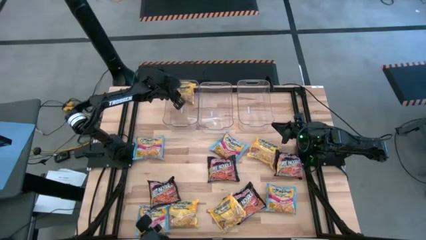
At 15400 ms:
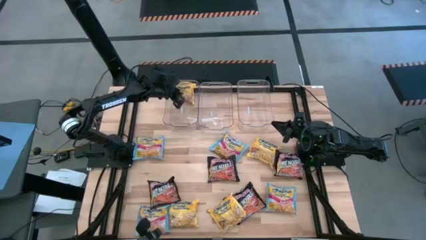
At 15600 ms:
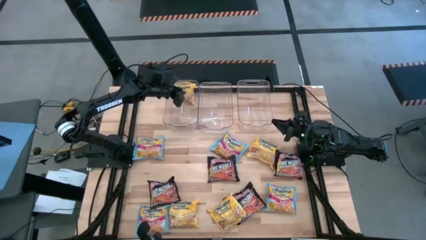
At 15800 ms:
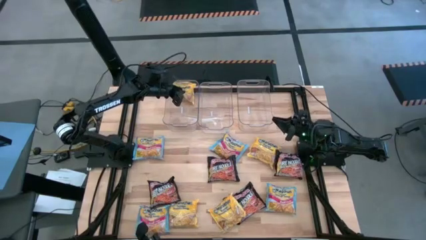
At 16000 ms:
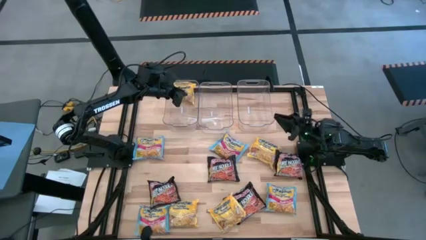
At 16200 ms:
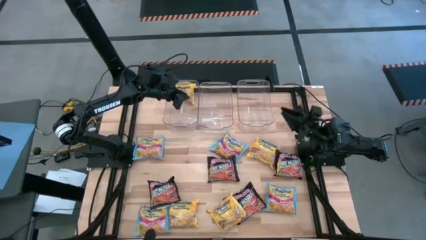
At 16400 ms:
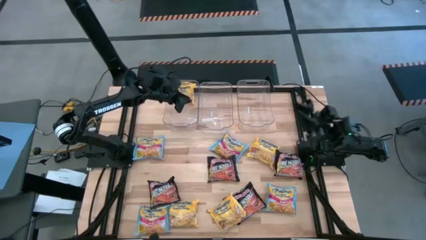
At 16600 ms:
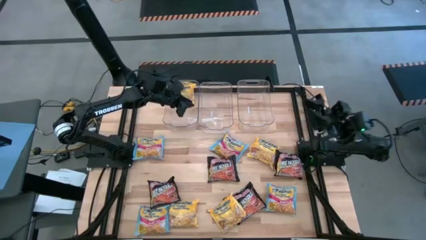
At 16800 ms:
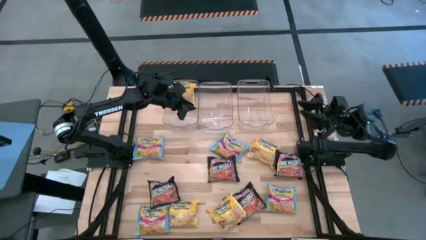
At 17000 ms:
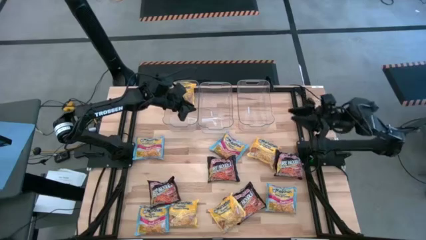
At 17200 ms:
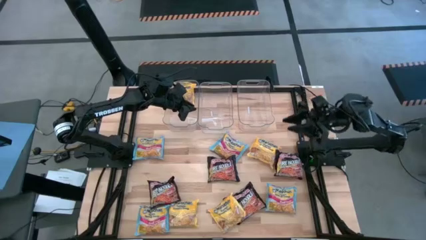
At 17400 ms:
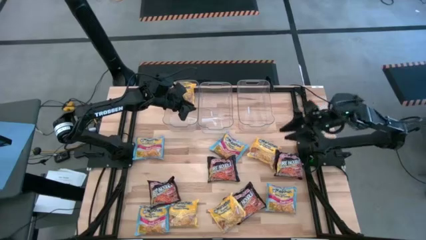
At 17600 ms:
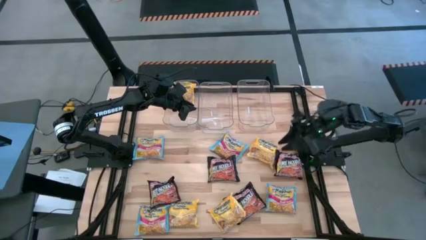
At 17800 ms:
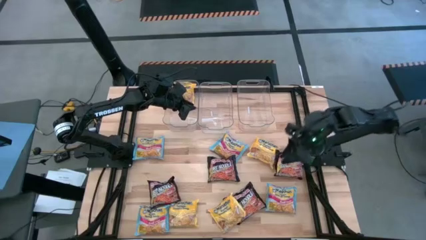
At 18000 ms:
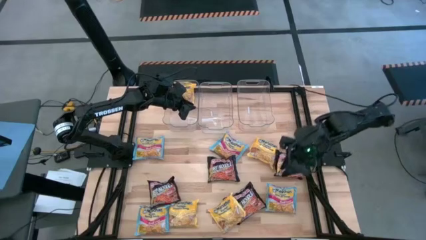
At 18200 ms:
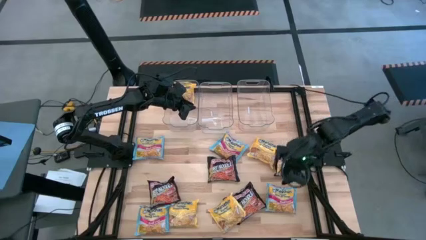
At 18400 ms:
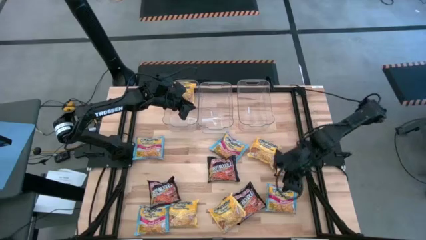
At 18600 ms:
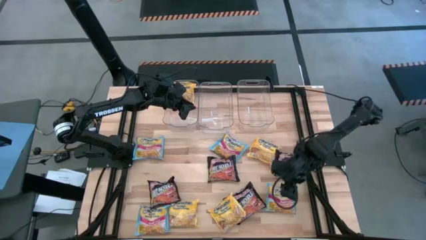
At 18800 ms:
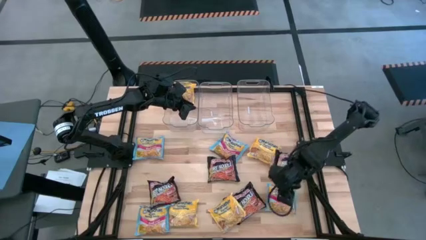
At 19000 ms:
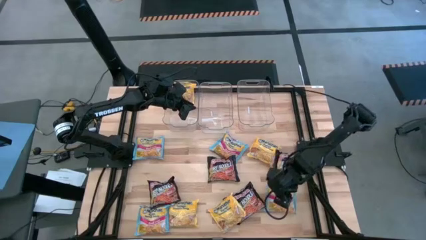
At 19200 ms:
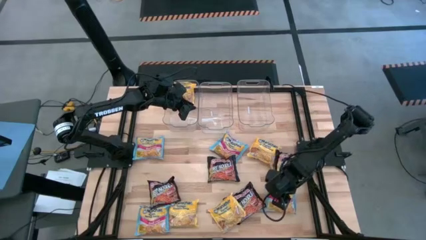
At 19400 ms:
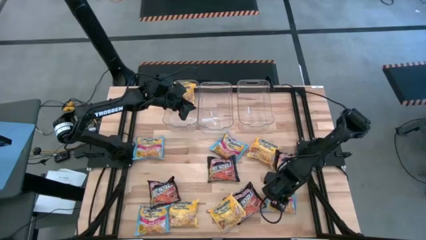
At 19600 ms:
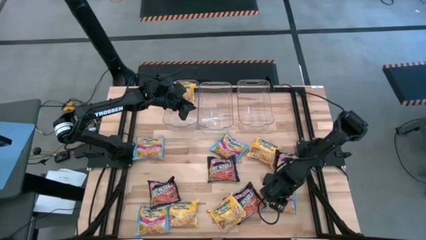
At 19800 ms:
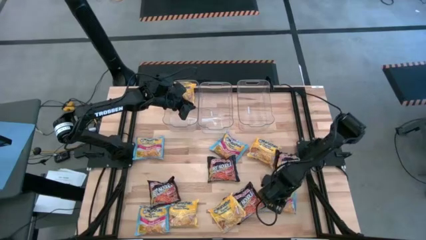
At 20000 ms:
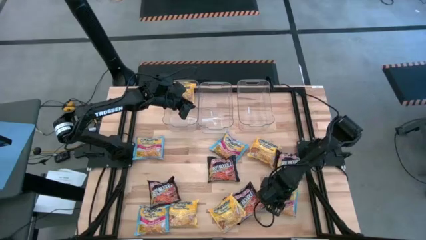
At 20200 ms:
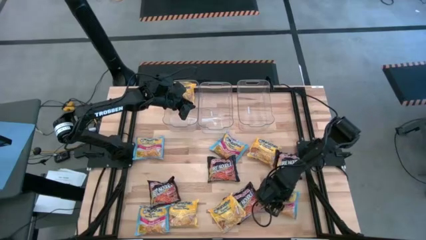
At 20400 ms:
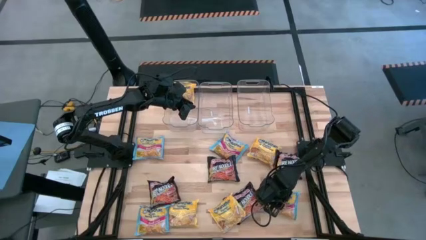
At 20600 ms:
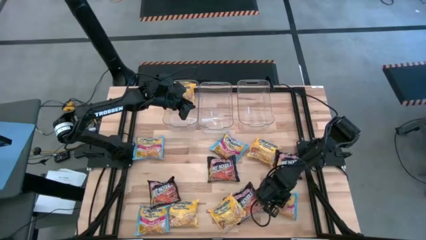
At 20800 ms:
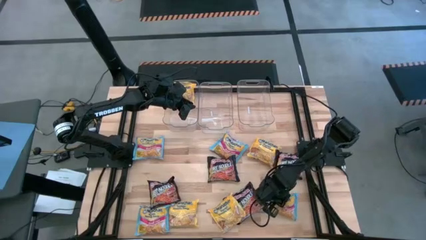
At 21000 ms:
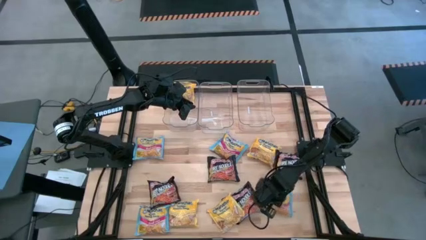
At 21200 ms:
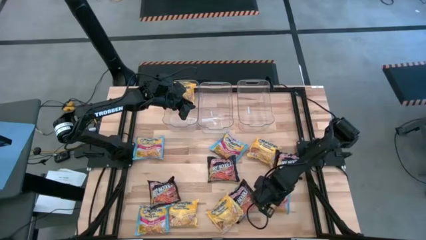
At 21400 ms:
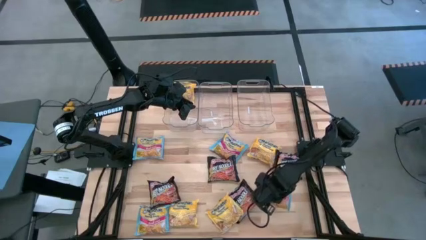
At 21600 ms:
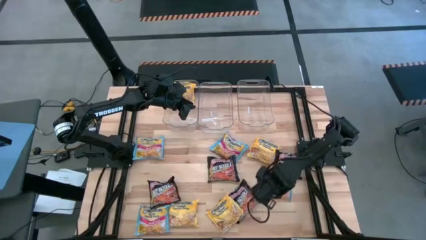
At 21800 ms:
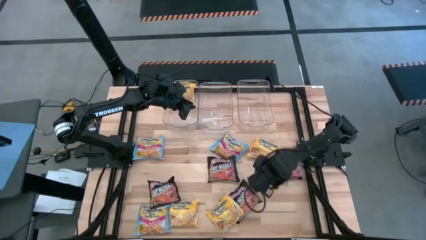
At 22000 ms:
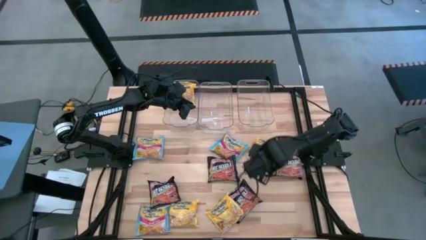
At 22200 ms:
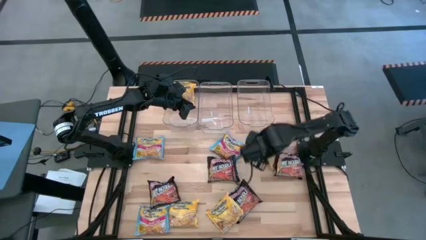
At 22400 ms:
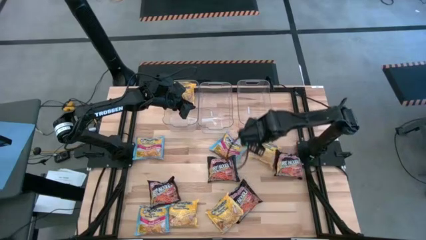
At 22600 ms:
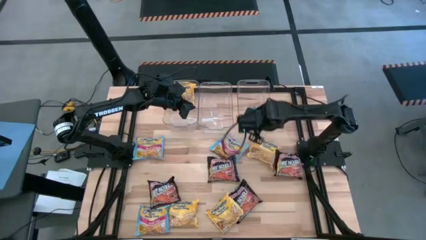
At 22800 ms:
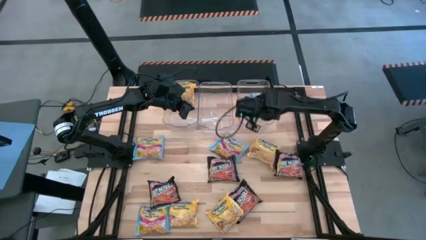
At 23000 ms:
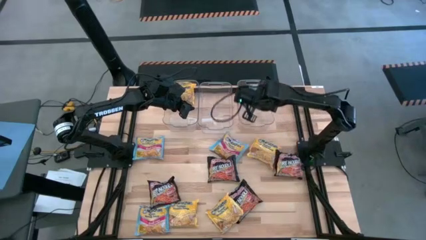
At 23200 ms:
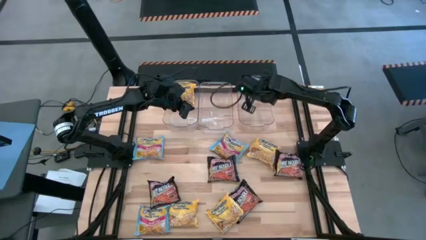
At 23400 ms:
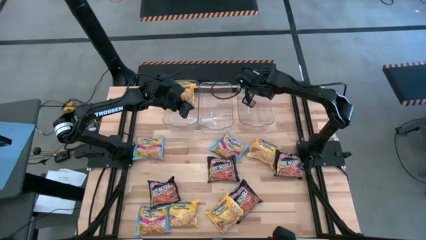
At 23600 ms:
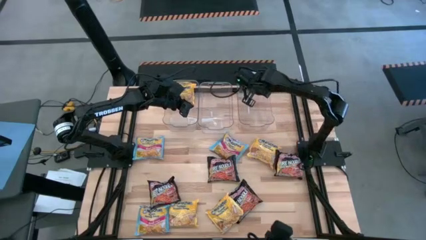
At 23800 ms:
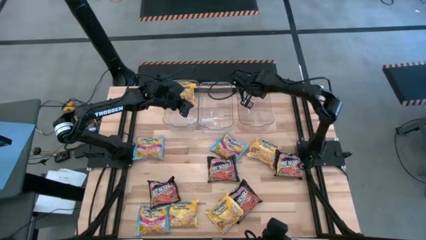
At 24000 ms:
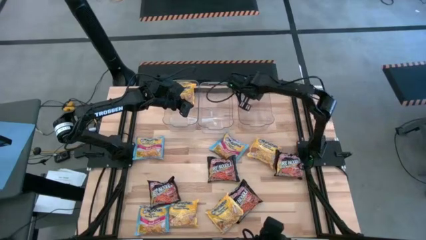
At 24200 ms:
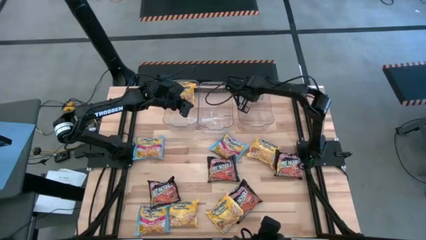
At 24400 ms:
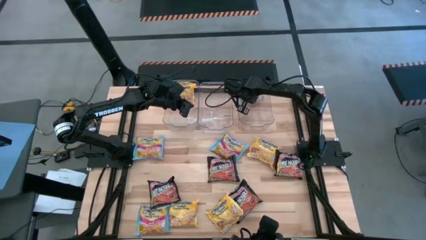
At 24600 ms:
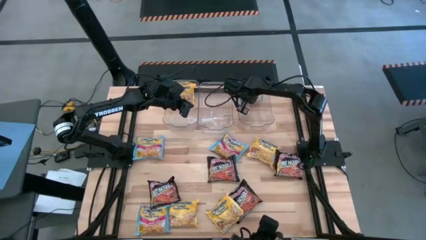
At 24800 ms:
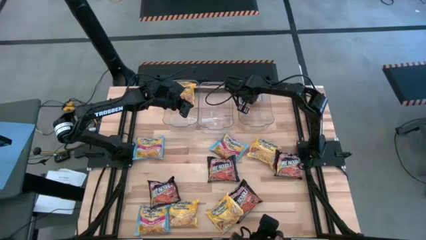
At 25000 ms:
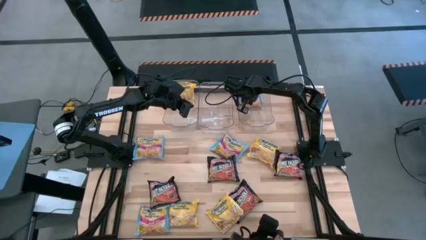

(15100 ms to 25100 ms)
Task: Sort Maruchan noodles
Put the blue noodle pack in the right transparent bin
